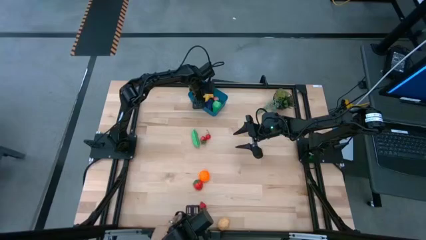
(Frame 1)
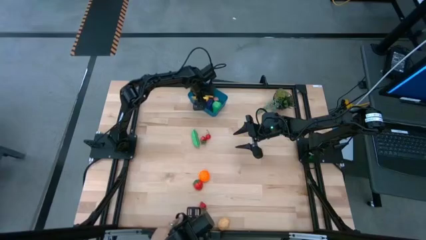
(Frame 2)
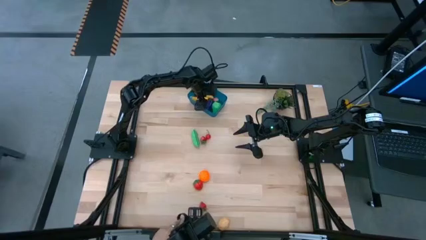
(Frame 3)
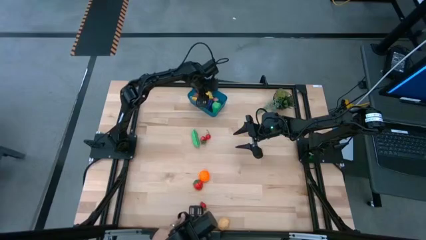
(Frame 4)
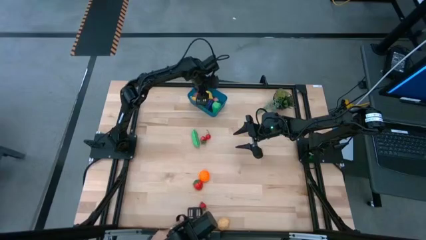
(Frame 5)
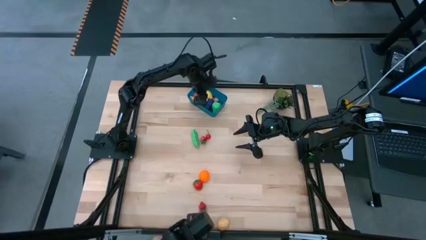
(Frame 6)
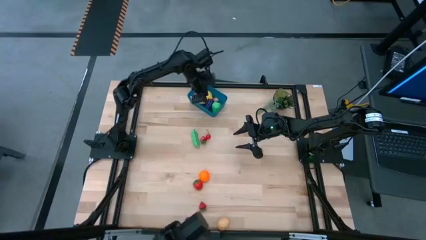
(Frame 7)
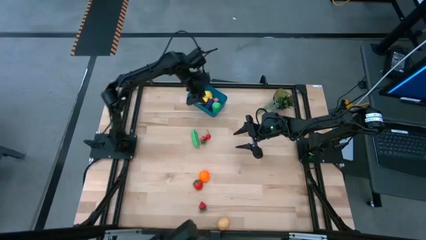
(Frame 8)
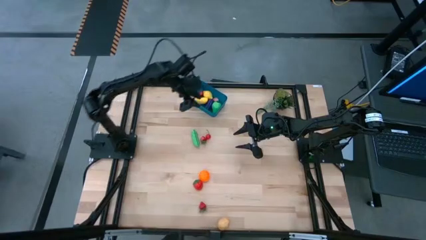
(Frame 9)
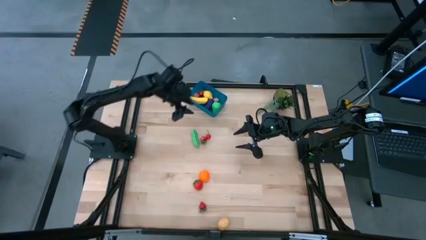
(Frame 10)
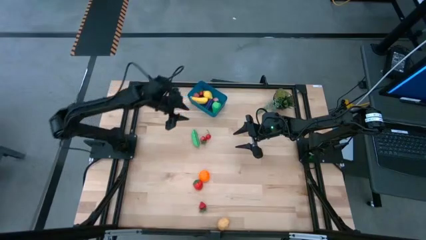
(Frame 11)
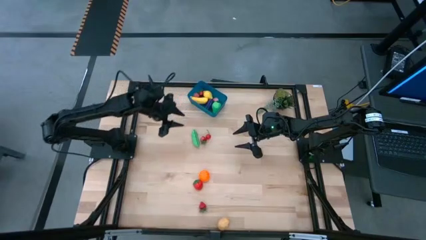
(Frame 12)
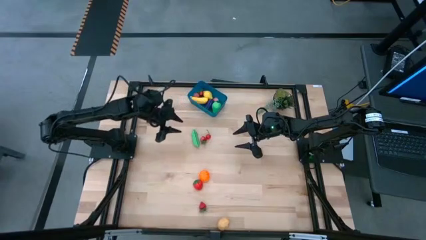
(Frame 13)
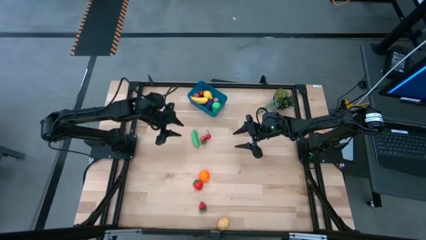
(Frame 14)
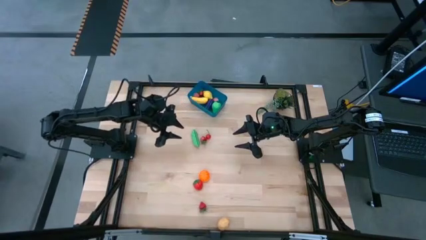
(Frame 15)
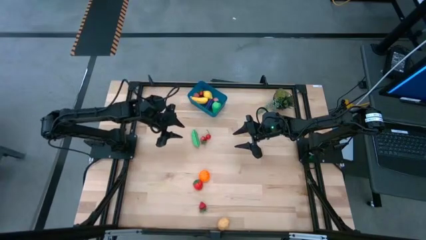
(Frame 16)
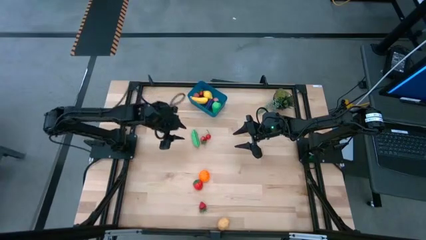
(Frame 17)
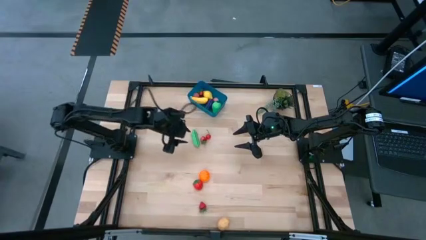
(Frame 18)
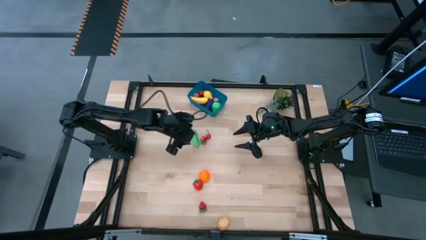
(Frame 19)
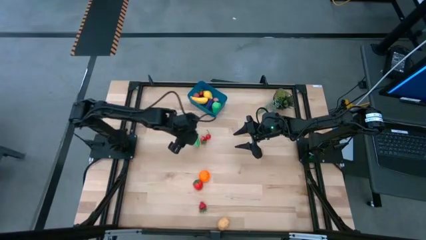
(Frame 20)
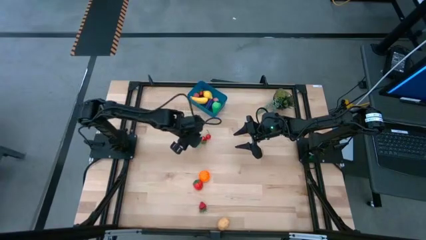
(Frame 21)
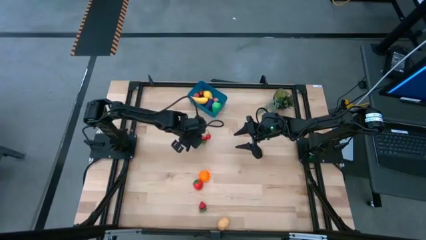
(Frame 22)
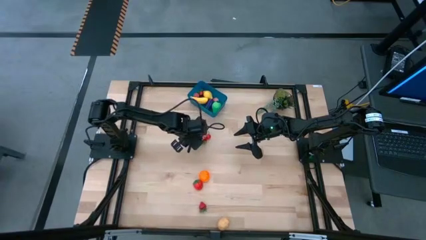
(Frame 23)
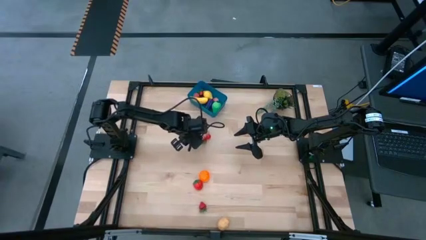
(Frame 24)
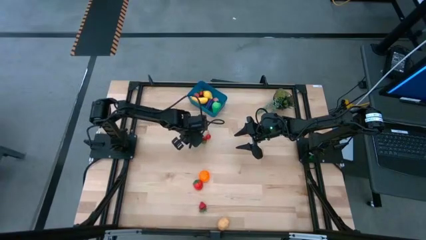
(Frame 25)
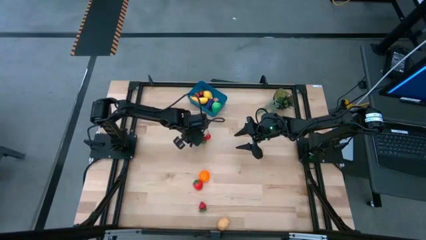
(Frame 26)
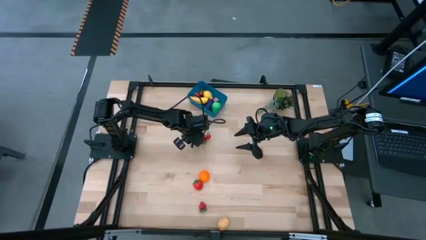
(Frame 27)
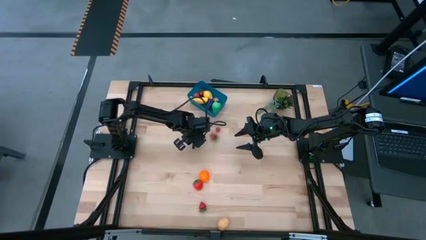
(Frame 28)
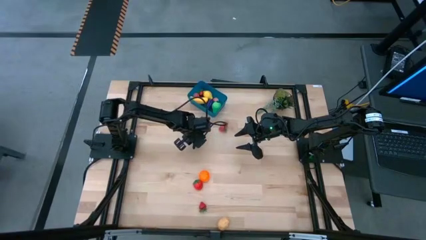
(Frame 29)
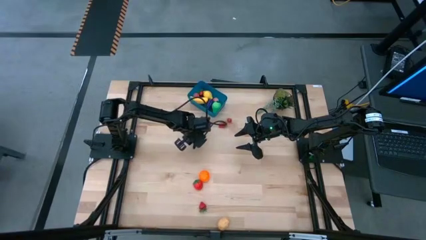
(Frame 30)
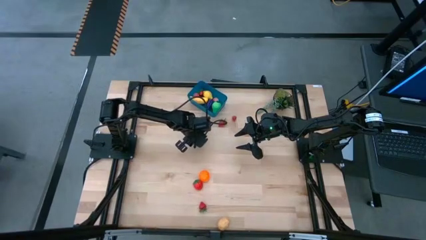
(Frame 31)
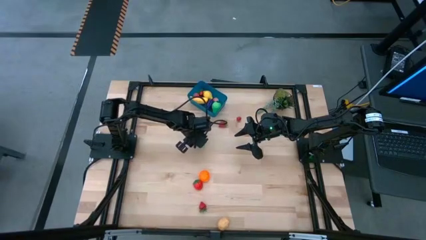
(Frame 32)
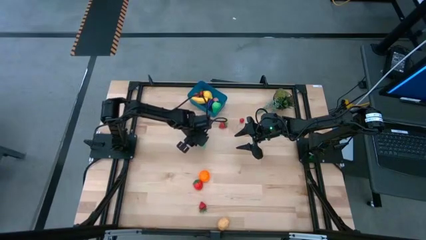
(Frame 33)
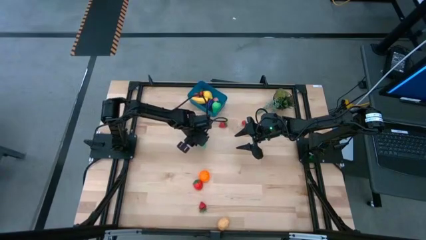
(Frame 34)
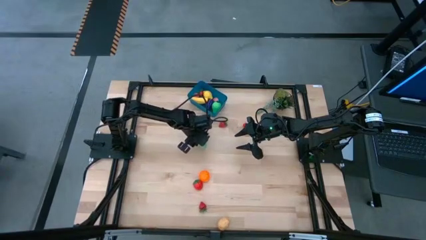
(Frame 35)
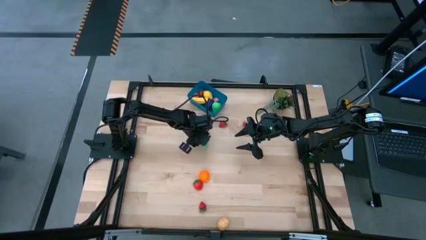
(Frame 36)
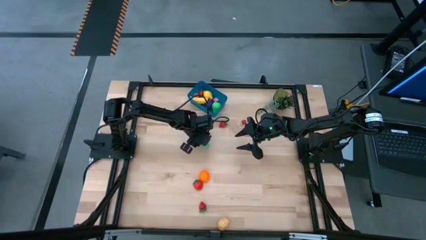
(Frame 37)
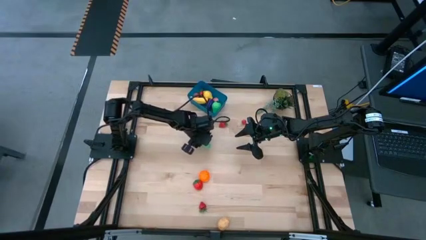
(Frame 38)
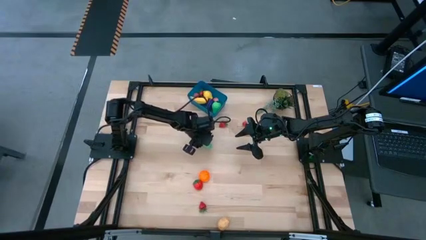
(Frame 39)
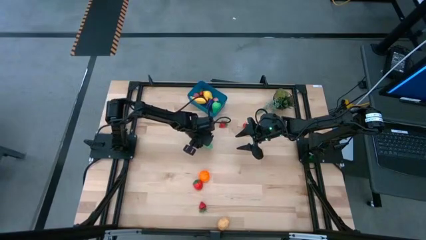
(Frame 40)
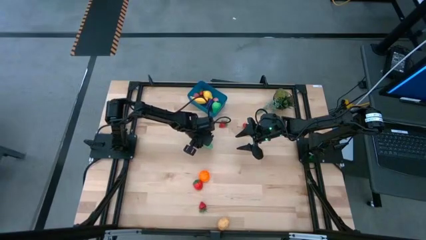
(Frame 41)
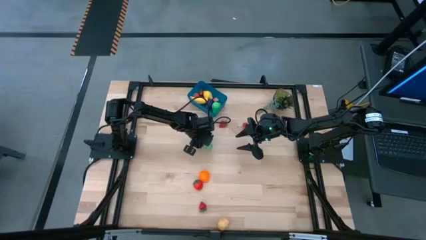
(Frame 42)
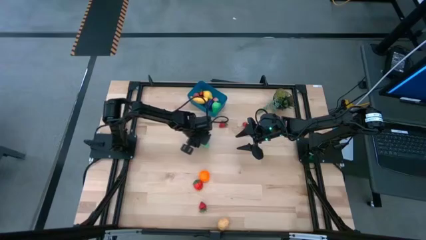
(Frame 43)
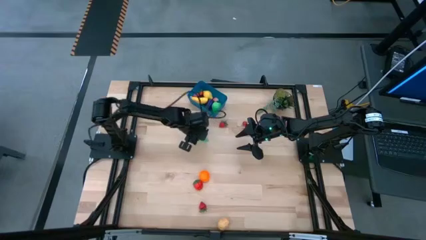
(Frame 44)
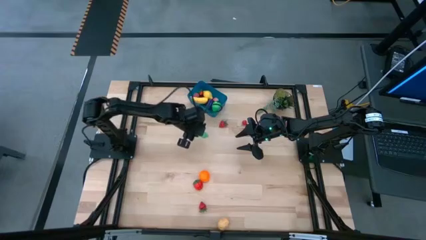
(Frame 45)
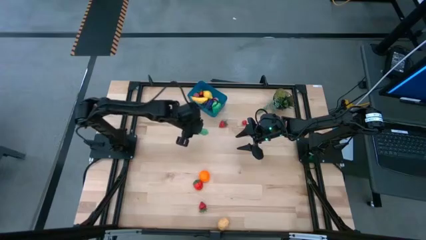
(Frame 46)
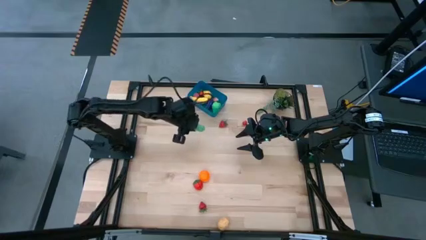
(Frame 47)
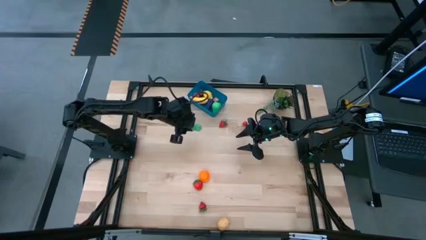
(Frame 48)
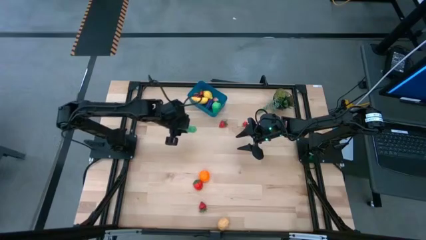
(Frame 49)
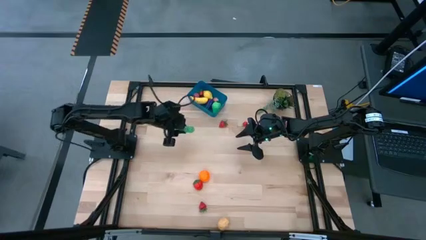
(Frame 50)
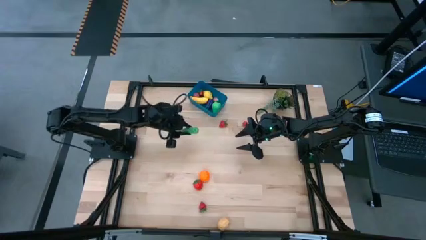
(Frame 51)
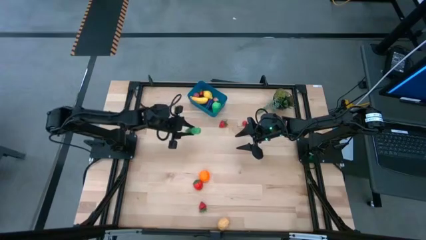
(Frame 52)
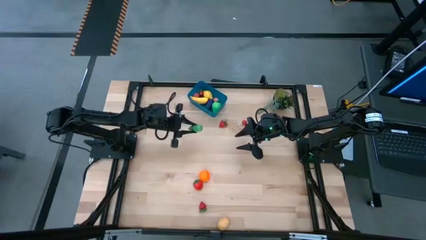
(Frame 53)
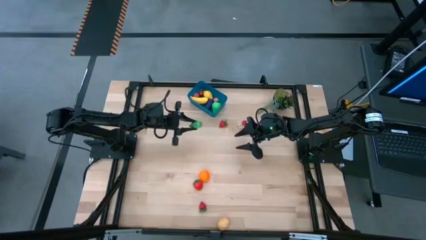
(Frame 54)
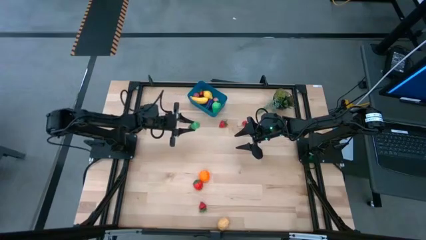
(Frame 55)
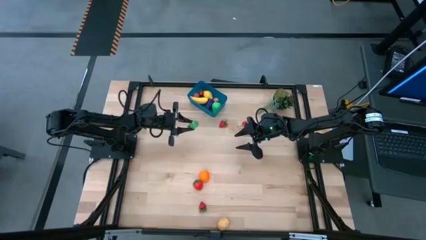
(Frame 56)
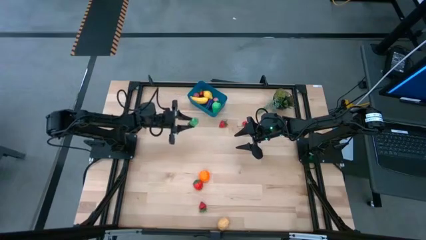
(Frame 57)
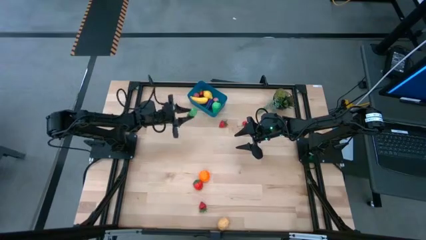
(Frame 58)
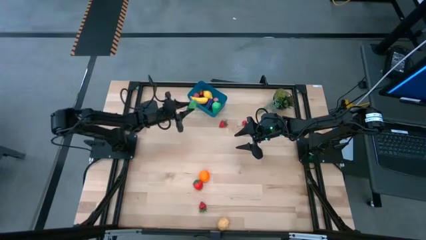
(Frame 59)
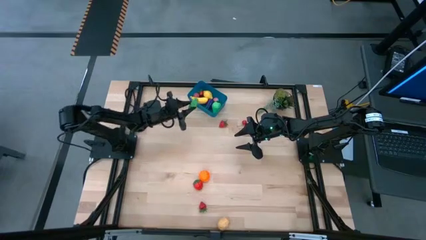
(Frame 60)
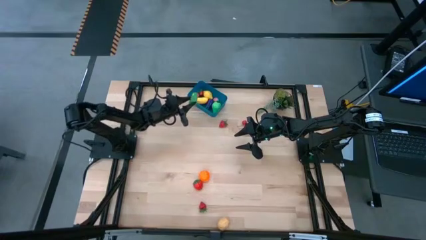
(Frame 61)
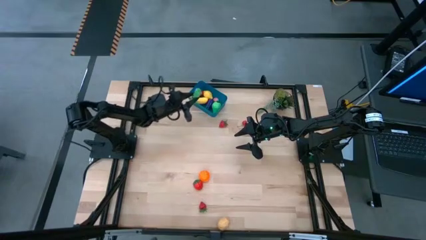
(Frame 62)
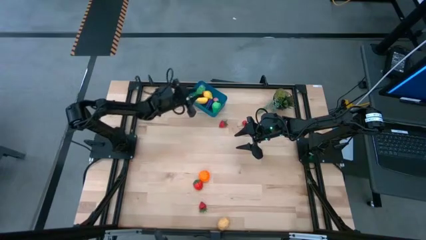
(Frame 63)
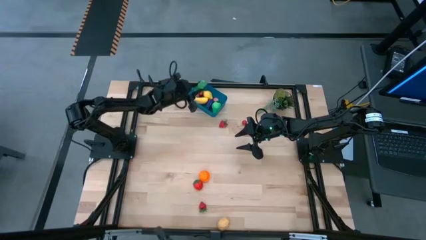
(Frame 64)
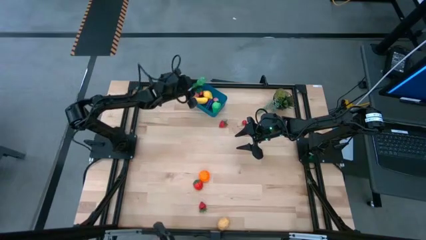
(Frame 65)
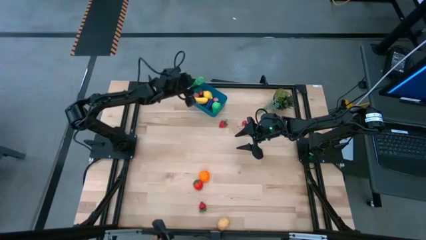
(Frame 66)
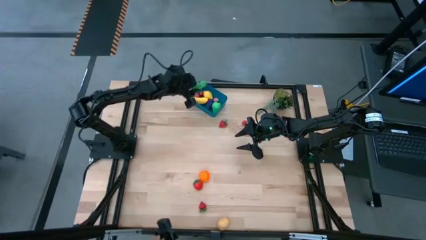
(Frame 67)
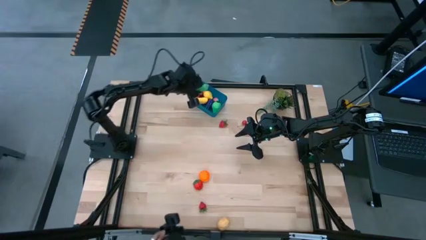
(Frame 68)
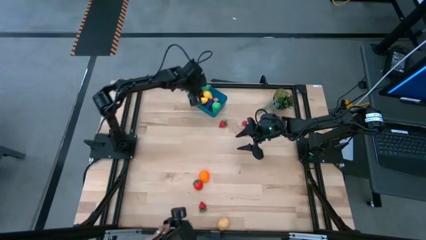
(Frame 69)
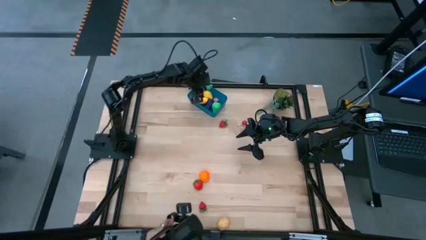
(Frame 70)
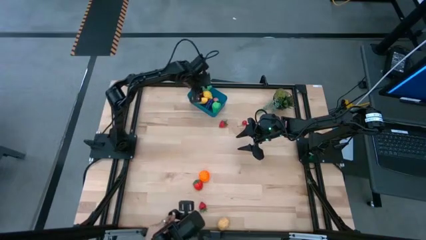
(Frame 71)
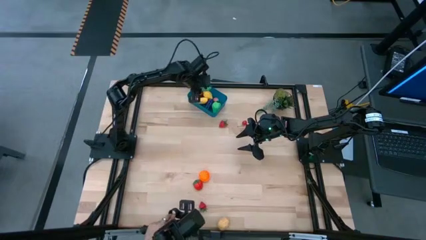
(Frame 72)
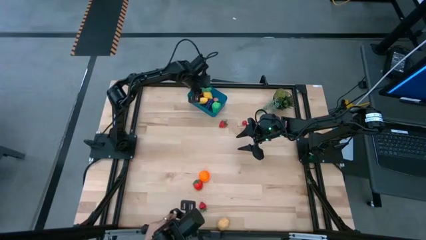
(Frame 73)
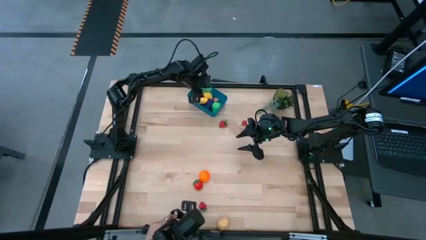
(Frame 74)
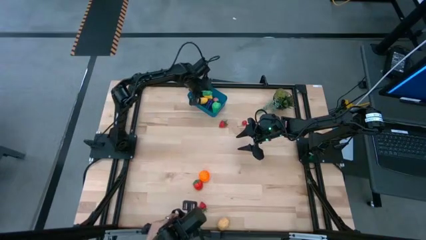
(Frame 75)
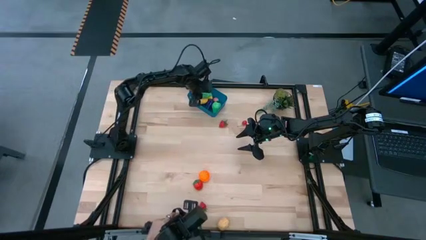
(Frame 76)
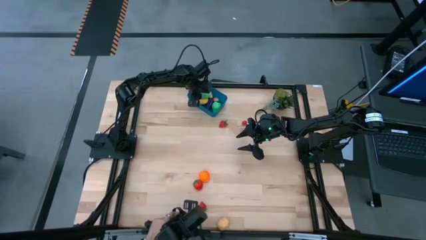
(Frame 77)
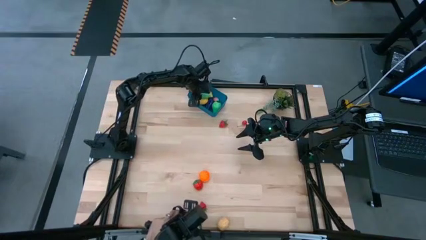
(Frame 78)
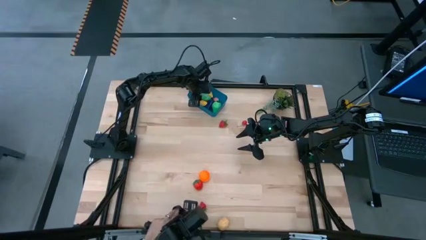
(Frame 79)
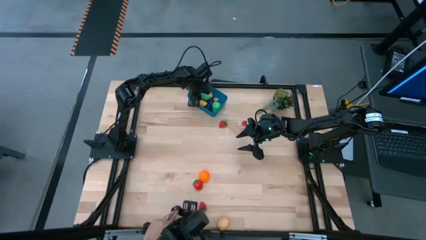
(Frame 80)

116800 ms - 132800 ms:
Task: Pick and placing Produce into tupperware
Put the green peas into the blue bin
